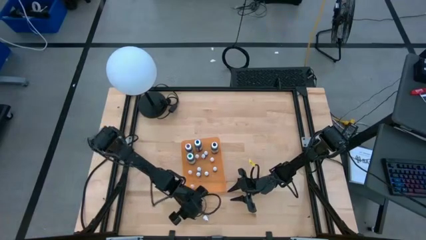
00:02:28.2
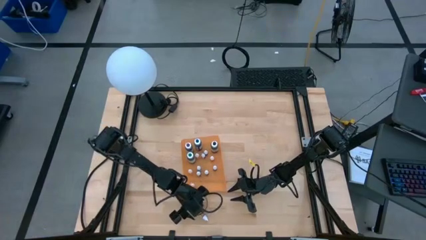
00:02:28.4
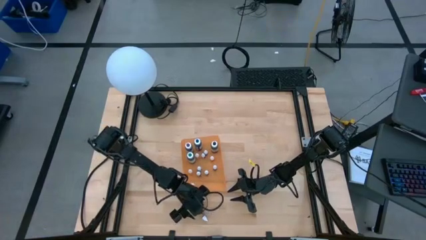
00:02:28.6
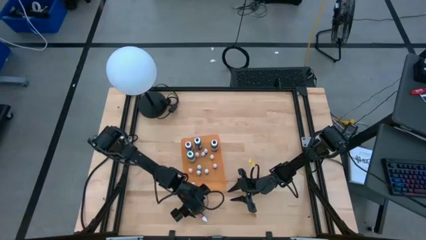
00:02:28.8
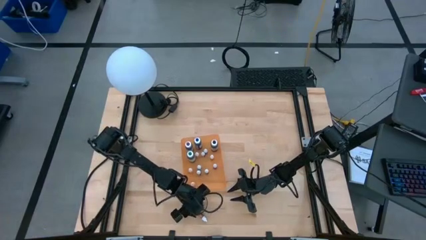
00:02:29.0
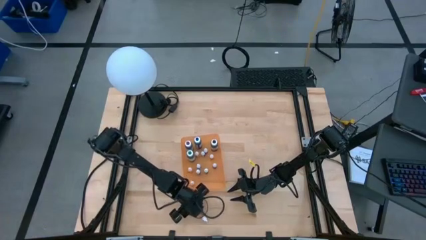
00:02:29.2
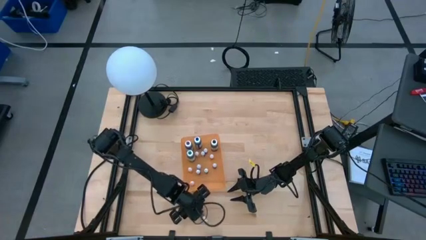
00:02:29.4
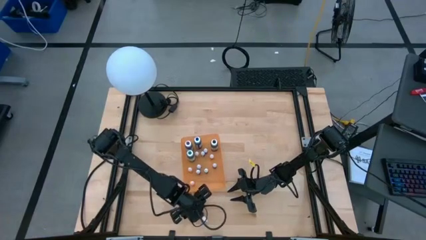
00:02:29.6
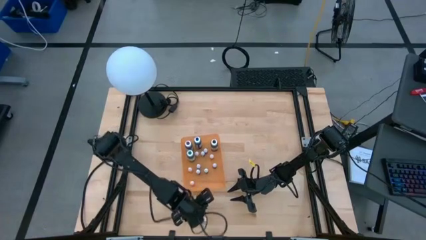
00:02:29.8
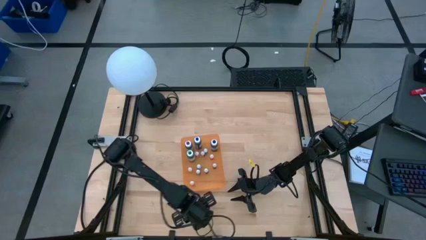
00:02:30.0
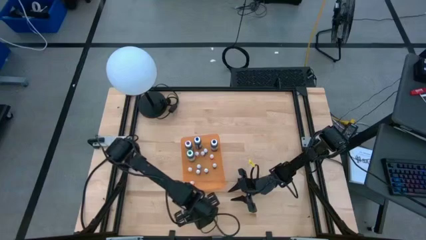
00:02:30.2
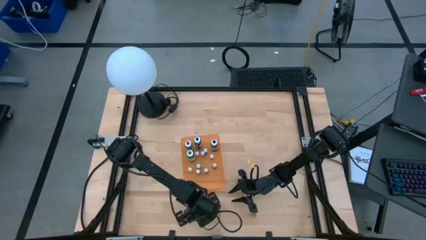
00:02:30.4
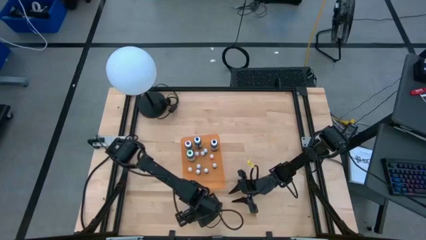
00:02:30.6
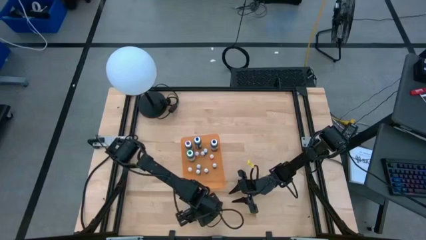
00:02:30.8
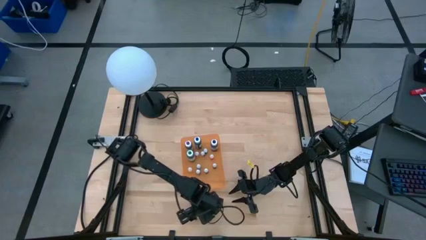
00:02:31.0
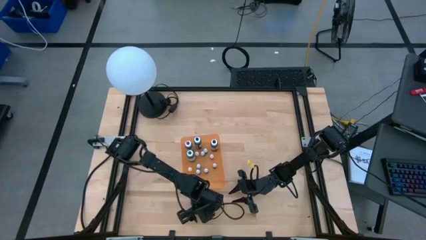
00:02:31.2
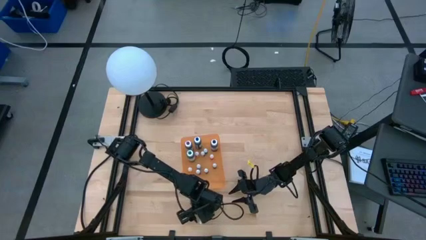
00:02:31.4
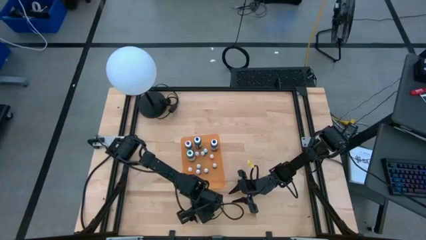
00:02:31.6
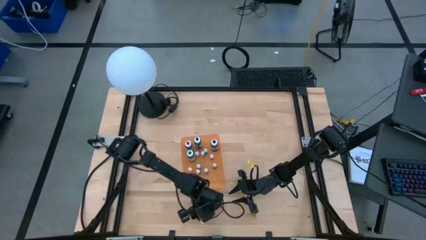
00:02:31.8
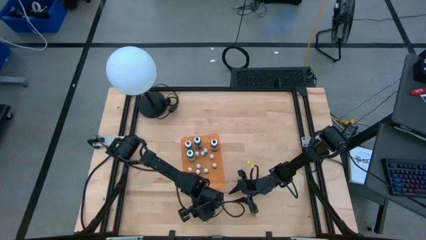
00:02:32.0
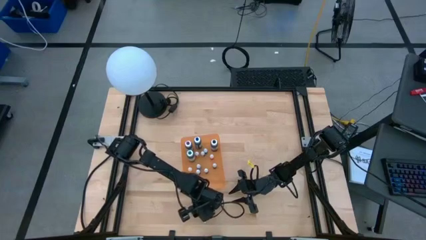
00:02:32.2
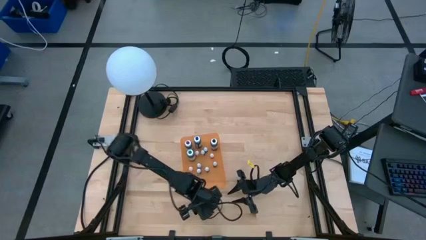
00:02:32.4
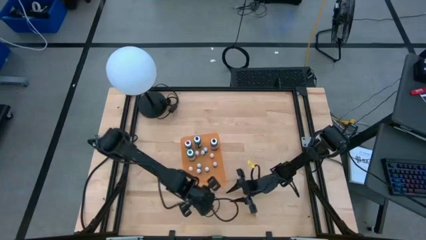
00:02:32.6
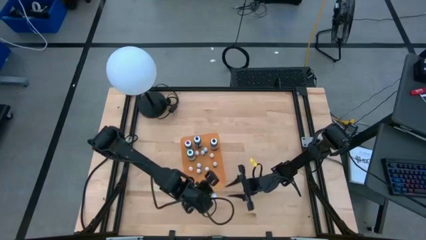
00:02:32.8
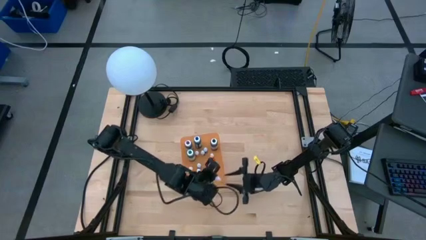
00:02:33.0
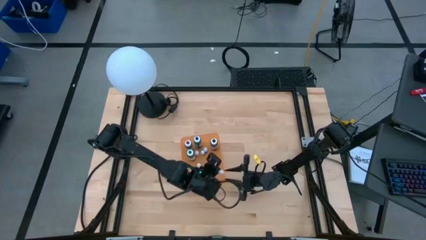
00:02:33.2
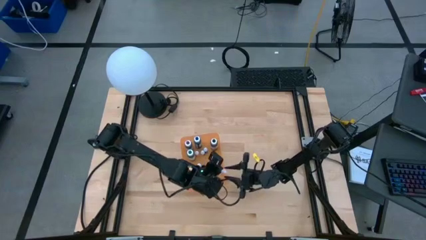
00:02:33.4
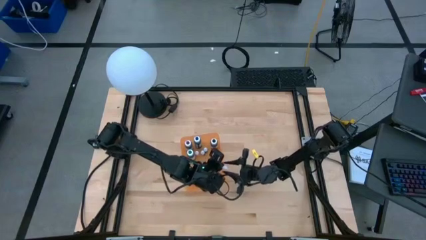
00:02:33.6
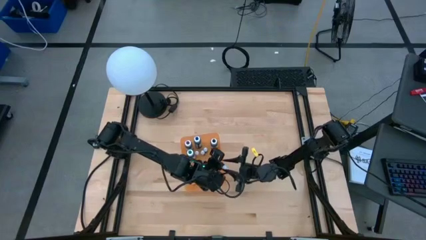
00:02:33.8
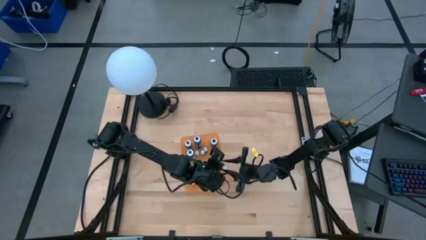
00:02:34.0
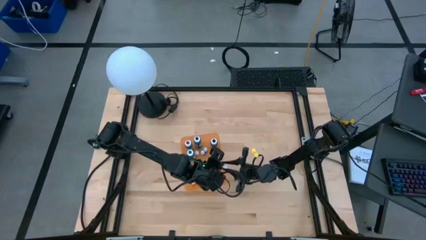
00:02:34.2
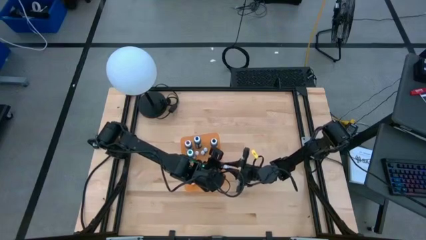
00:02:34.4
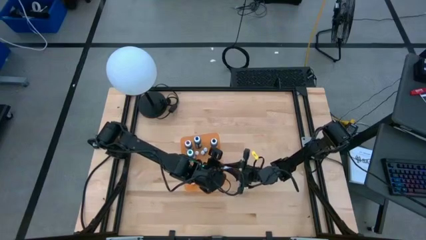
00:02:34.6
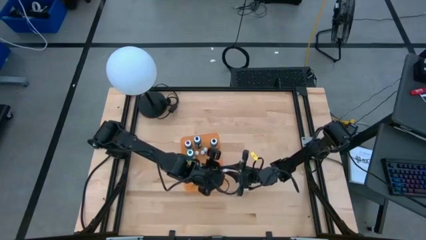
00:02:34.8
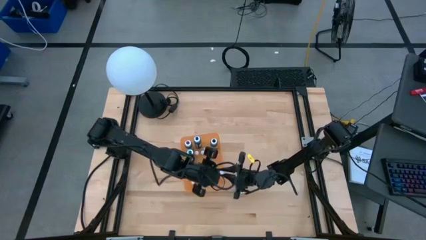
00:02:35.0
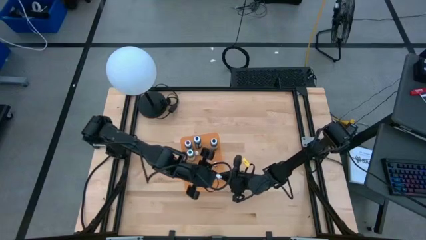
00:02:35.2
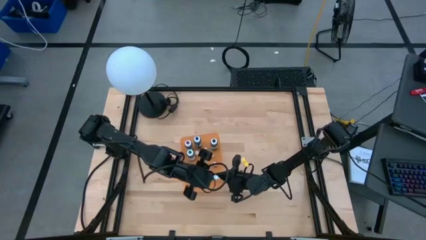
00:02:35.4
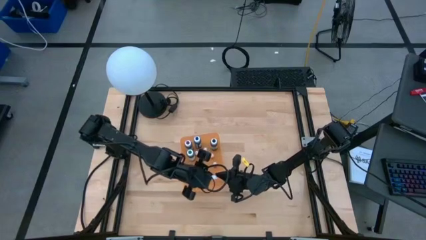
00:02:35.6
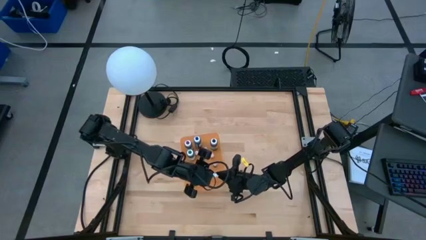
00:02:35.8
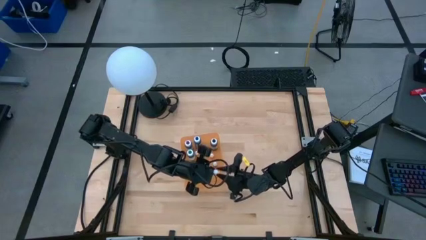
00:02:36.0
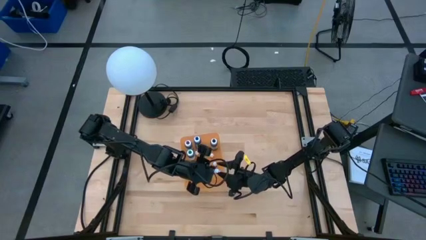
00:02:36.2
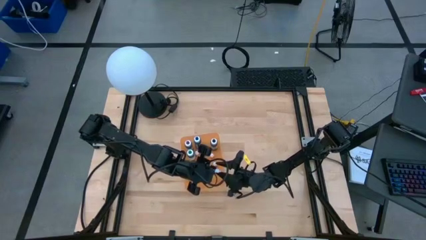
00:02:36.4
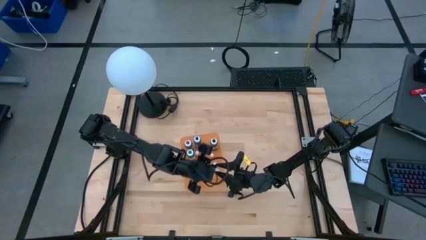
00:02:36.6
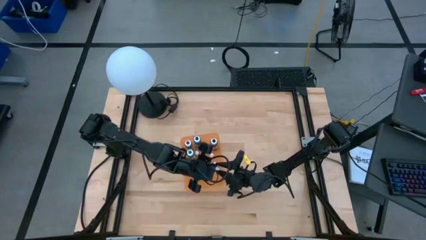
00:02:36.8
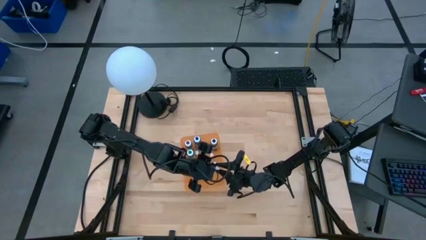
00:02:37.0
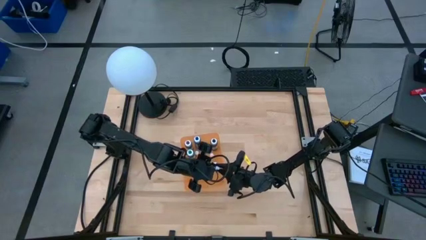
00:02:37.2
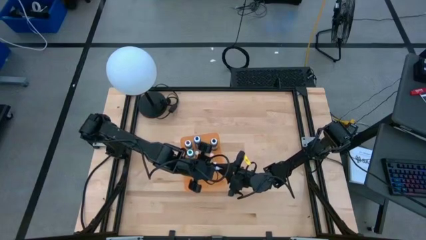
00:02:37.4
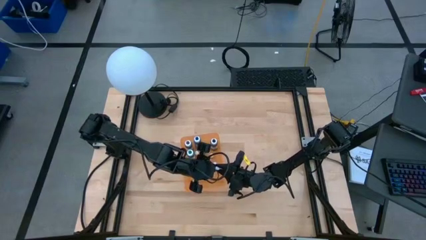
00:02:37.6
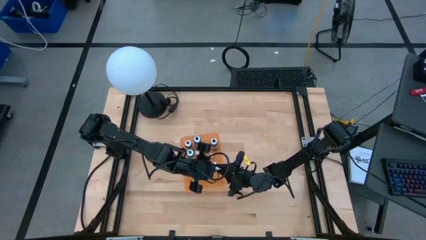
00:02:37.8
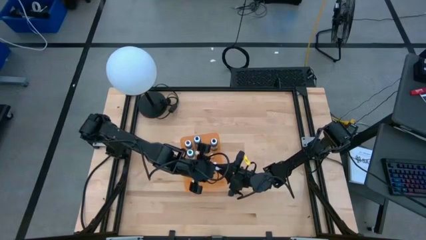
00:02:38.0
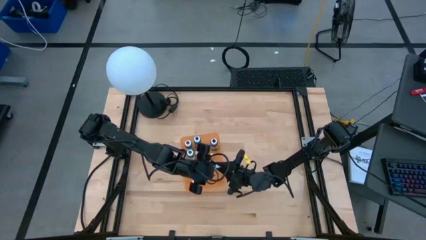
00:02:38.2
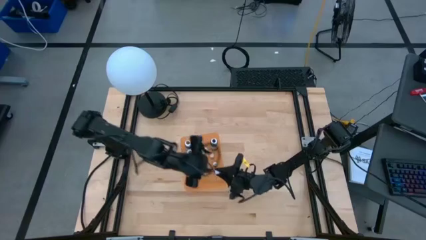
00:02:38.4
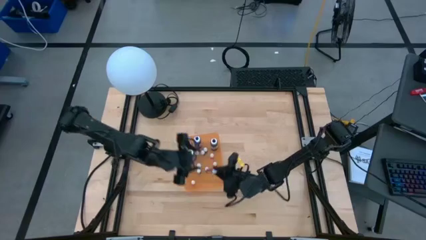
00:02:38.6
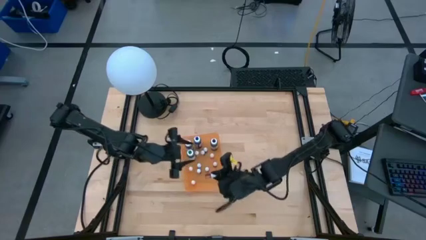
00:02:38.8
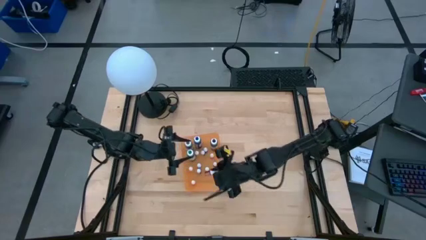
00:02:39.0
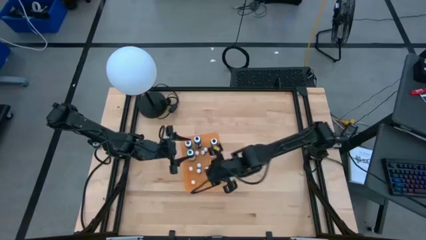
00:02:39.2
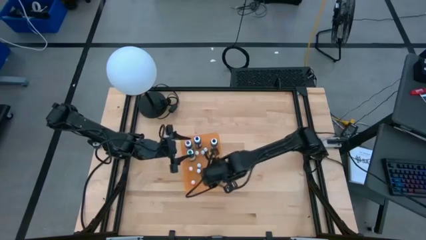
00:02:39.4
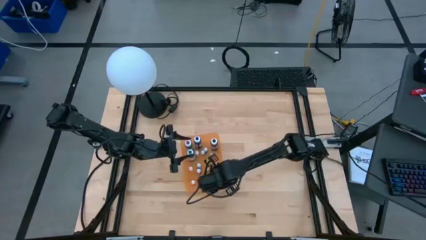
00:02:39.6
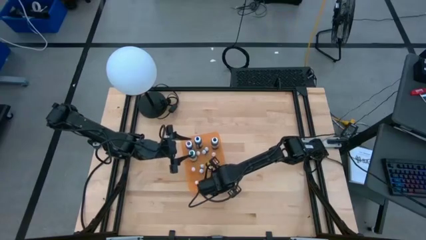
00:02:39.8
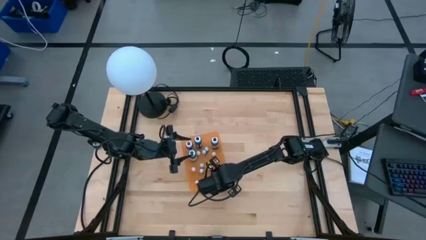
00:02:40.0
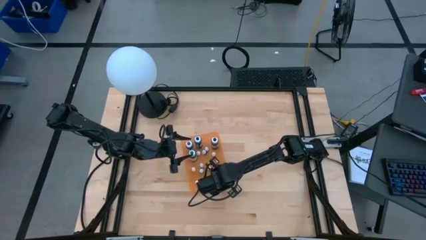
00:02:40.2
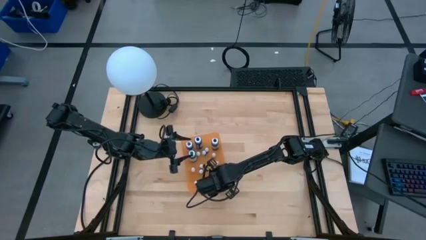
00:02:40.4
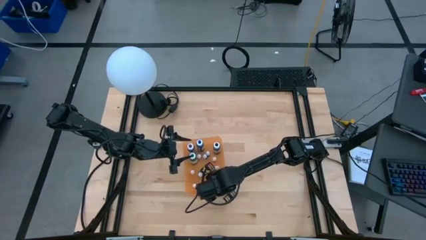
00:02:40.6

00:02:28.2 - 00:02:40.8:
Task: Pick & Place food coloring
Put the small orange food coloring bottle into the orange bin

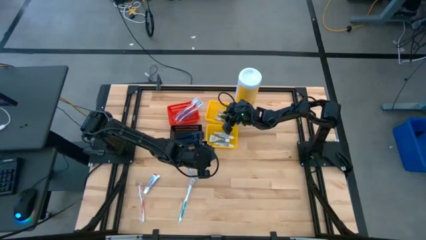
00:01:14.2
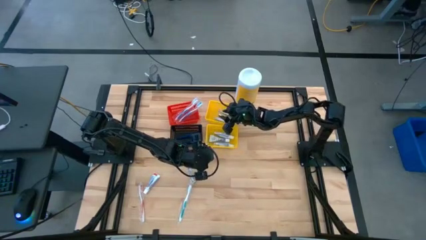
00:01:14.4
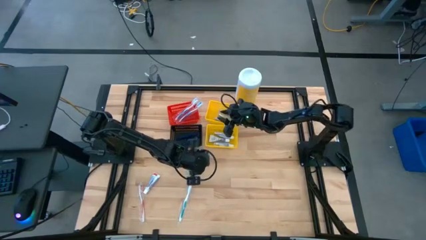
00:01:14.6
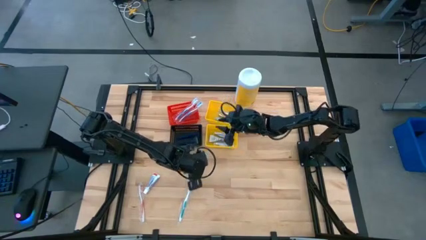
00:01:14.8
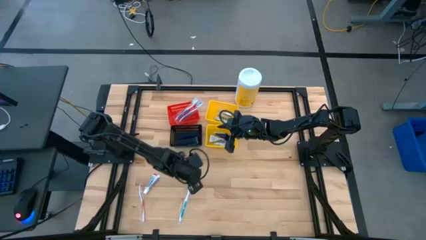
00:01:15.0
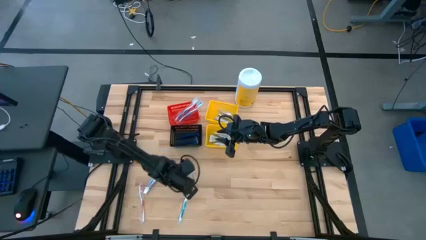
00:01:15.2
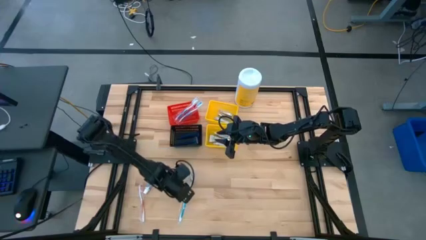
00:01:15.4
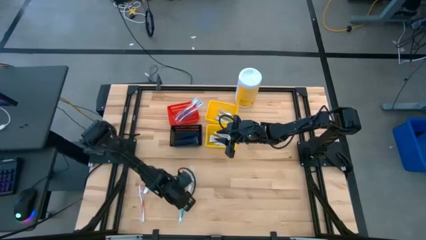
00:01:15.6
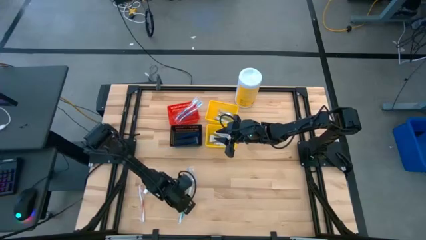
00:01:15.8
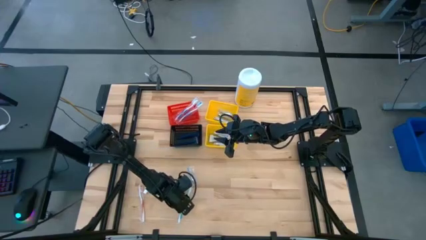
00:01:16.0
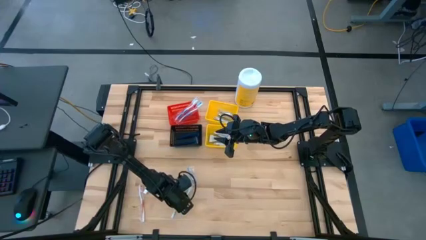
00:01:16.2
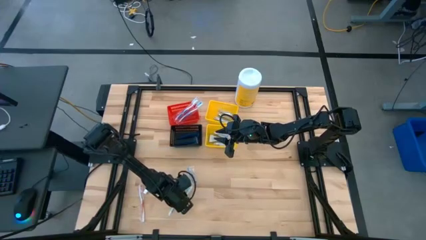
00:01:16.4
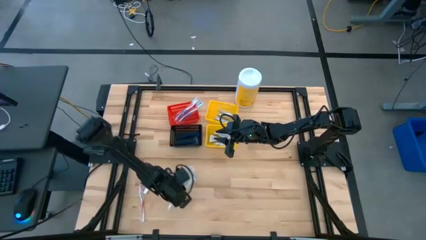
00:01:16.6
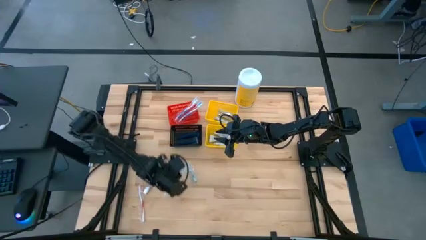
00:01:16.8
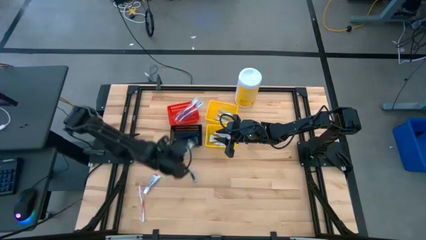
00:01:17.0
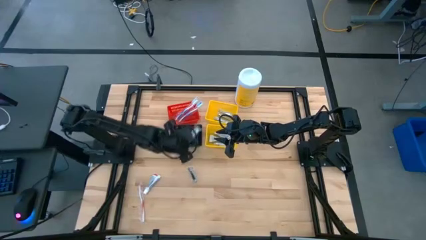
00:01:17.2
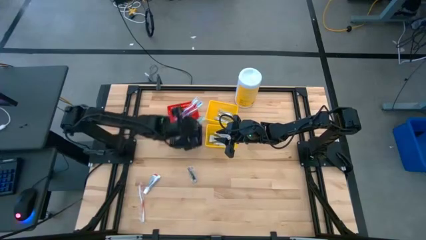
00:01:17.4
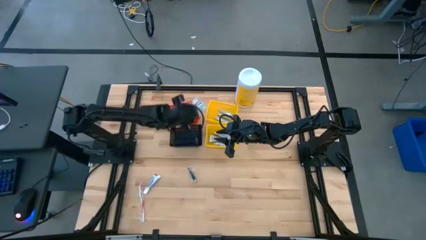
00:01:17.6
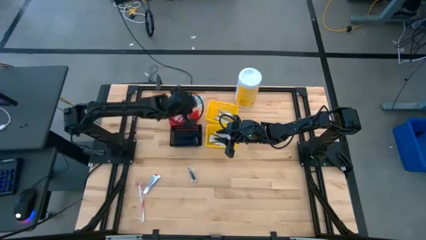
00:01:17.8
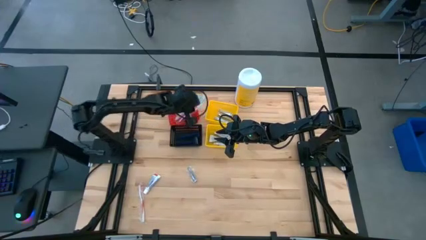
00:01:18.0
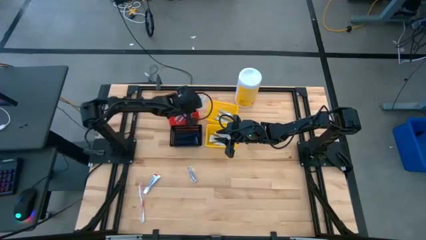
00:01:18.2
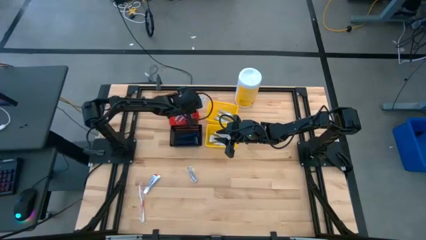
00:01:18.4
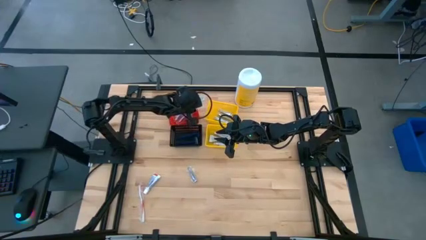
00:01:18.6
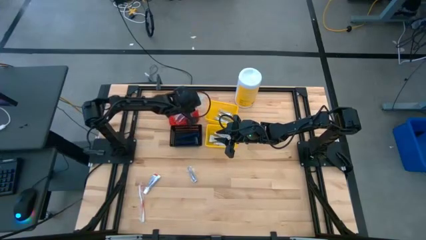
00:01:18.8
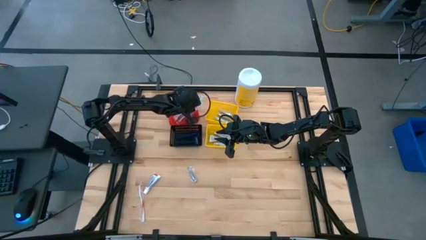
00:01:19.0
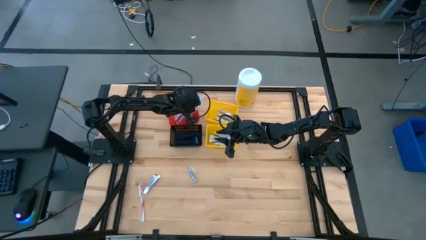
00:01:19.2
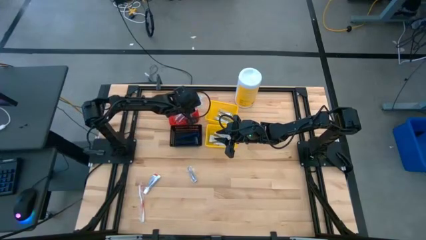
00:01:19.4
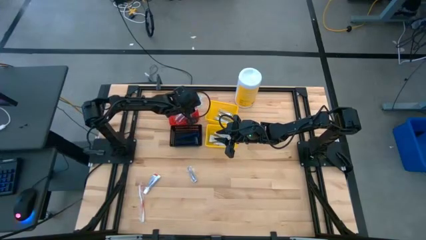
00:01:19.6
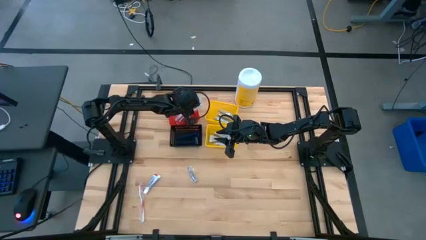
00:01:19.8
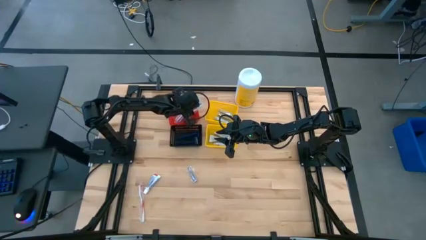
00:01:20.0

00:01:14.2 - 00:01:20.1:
Task: Pick & Place Travel size toiletries
Put the green toothbrush into the red bin
